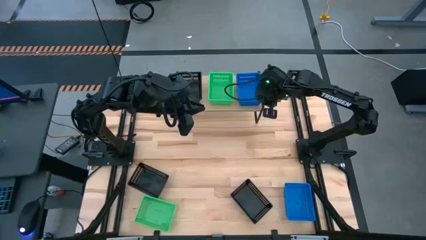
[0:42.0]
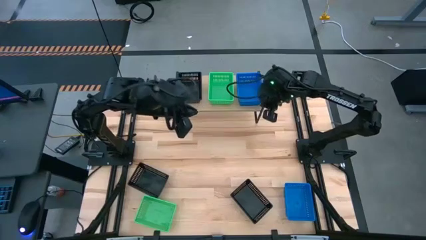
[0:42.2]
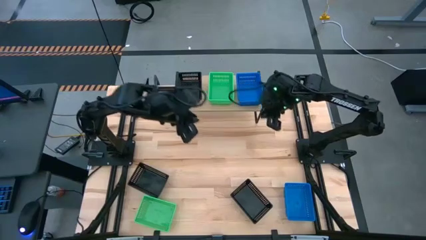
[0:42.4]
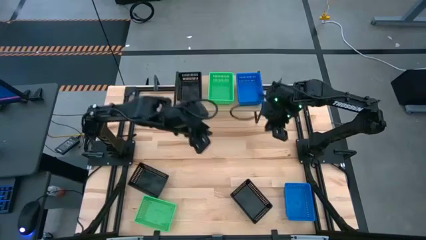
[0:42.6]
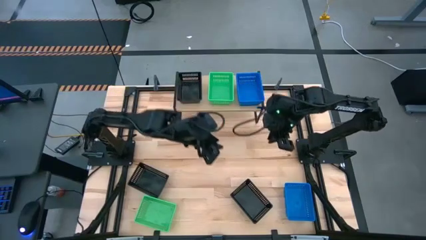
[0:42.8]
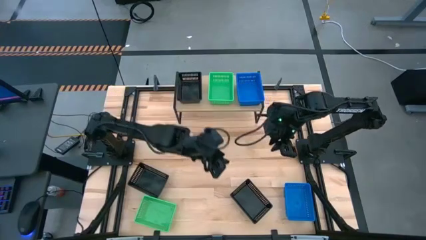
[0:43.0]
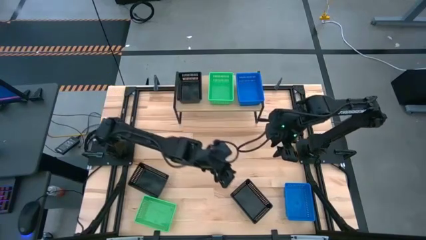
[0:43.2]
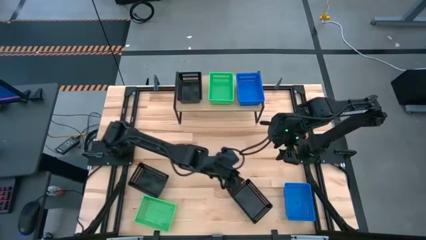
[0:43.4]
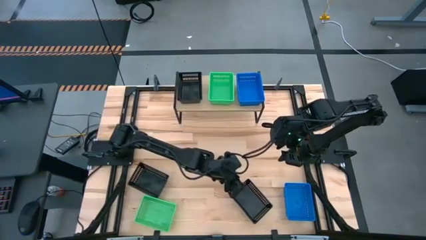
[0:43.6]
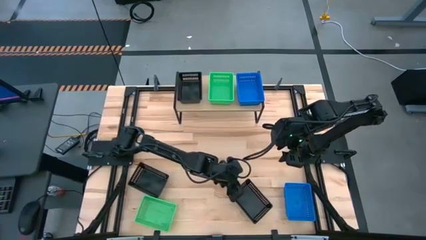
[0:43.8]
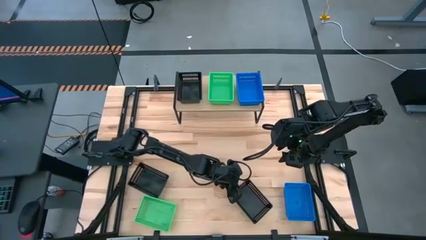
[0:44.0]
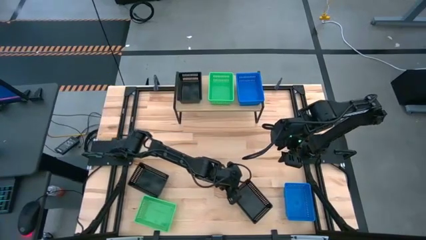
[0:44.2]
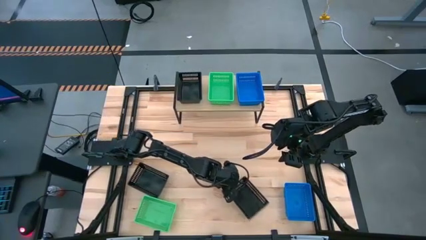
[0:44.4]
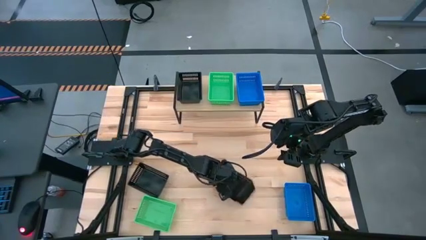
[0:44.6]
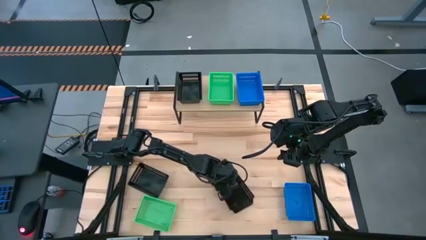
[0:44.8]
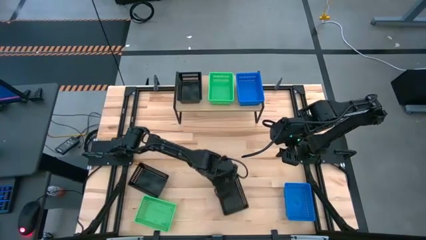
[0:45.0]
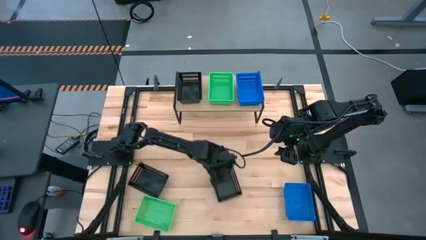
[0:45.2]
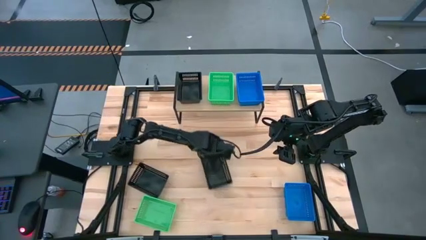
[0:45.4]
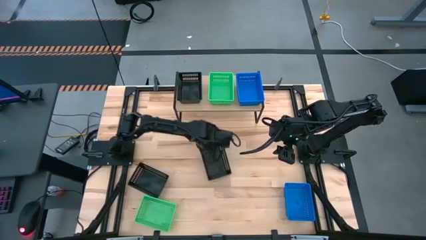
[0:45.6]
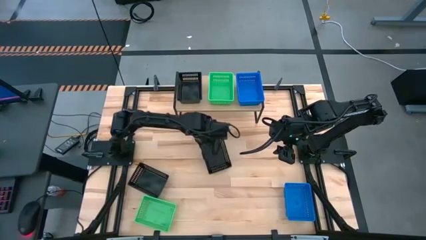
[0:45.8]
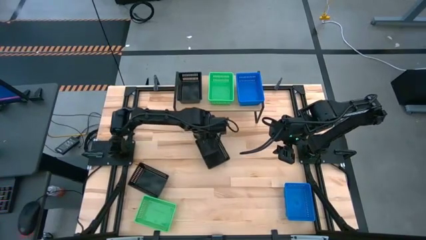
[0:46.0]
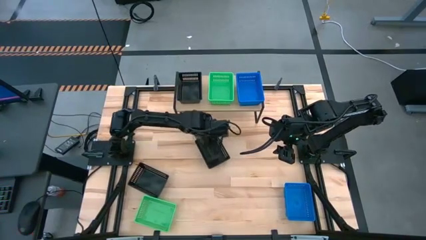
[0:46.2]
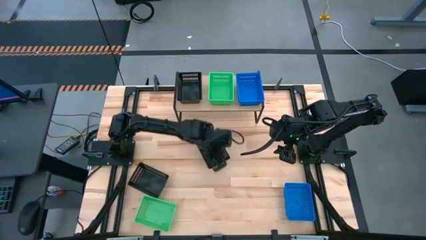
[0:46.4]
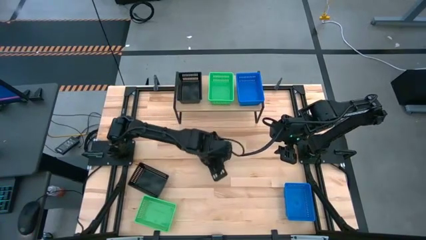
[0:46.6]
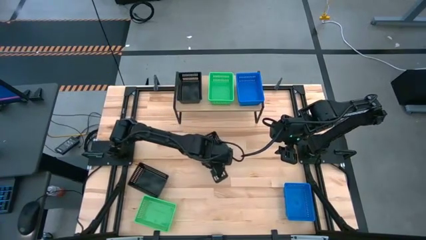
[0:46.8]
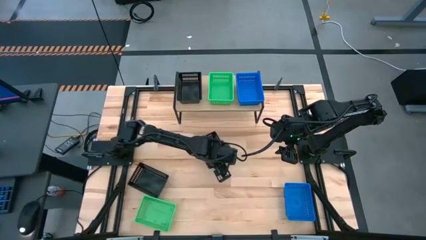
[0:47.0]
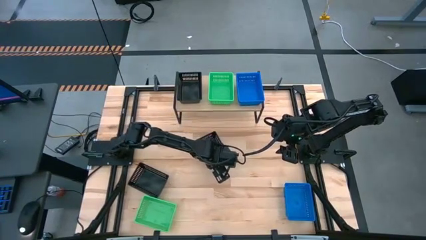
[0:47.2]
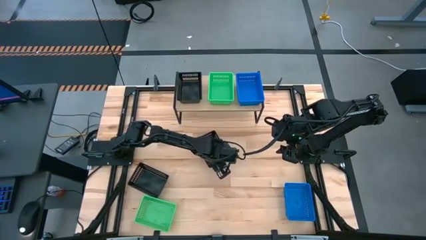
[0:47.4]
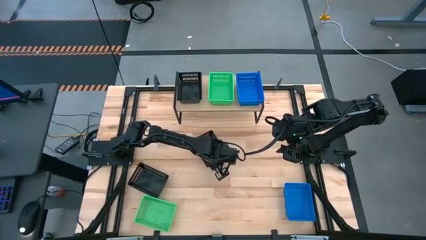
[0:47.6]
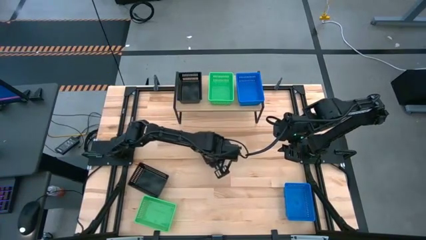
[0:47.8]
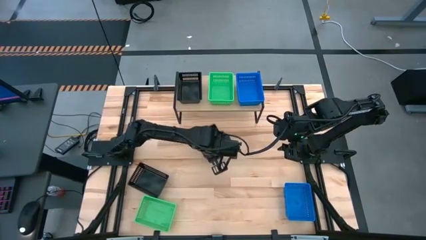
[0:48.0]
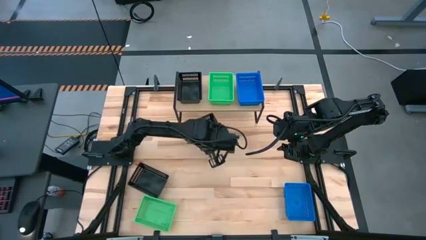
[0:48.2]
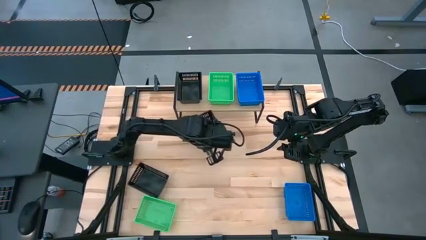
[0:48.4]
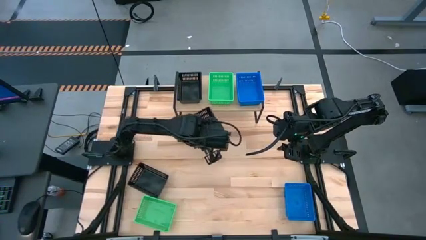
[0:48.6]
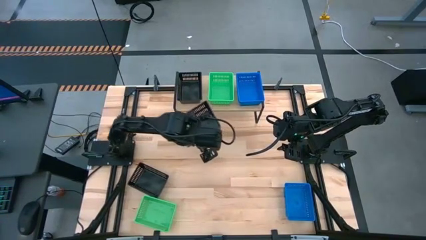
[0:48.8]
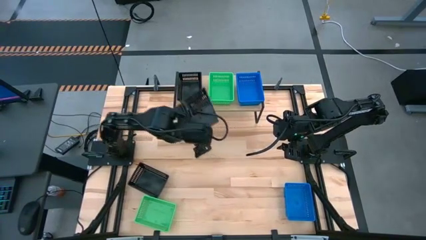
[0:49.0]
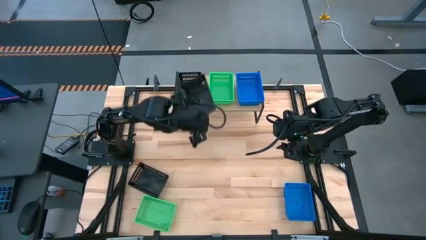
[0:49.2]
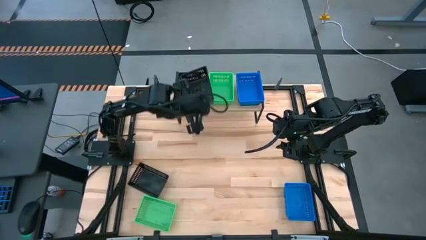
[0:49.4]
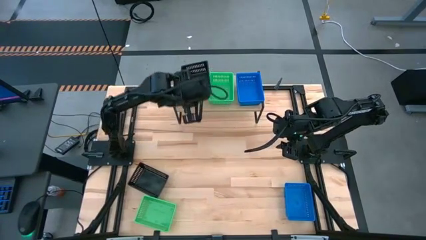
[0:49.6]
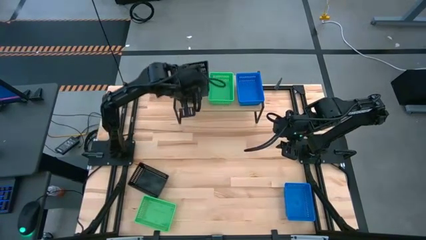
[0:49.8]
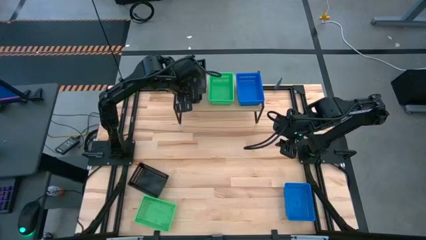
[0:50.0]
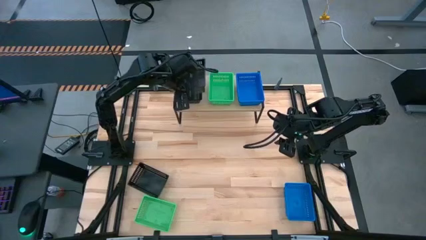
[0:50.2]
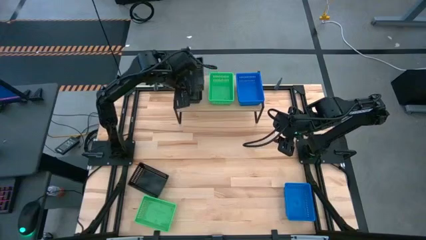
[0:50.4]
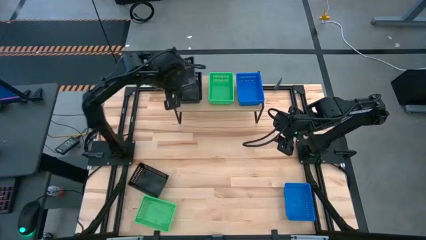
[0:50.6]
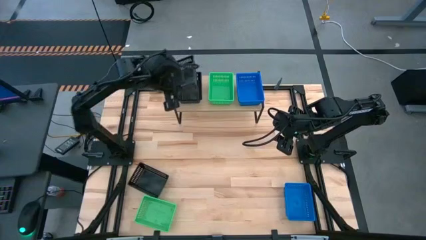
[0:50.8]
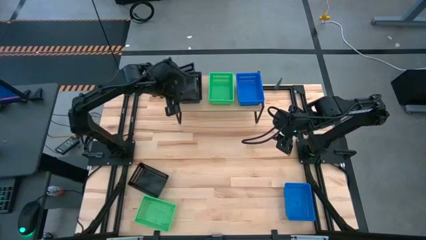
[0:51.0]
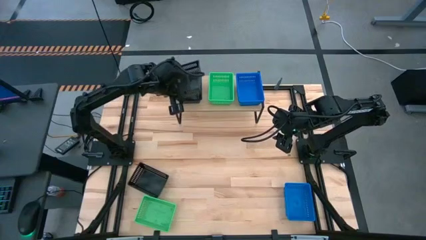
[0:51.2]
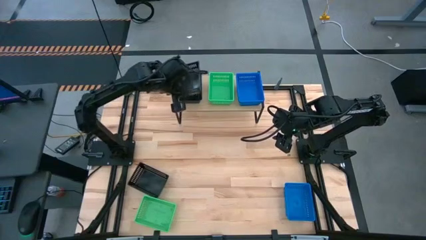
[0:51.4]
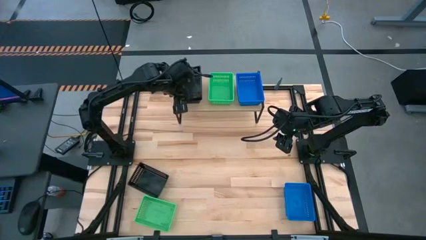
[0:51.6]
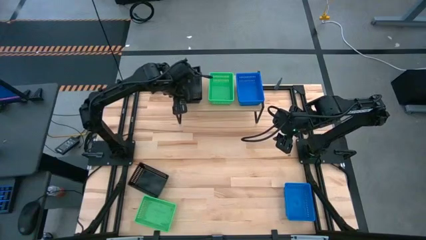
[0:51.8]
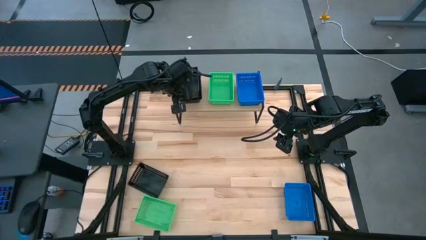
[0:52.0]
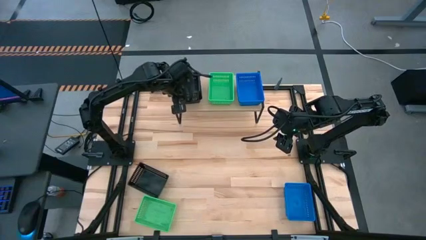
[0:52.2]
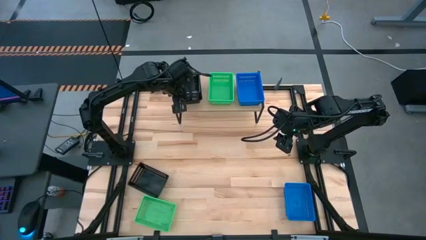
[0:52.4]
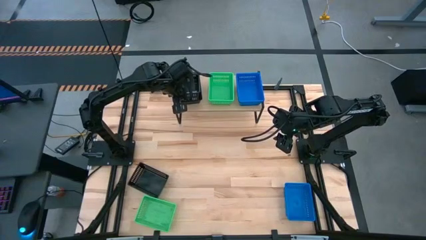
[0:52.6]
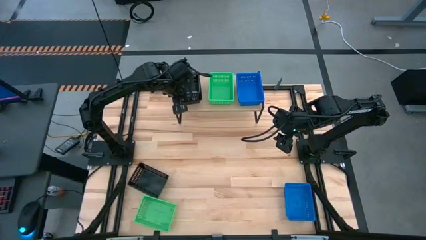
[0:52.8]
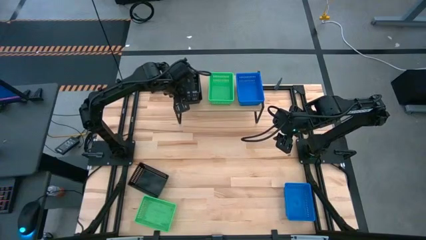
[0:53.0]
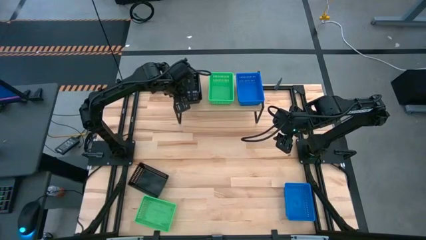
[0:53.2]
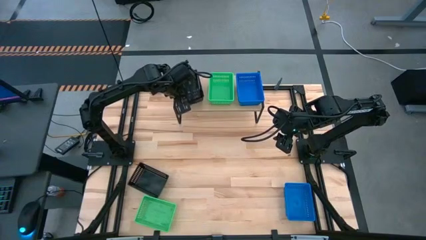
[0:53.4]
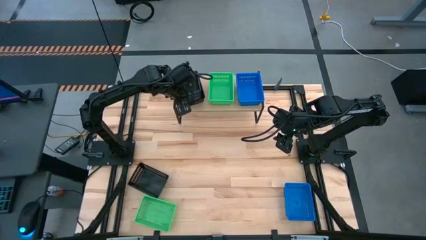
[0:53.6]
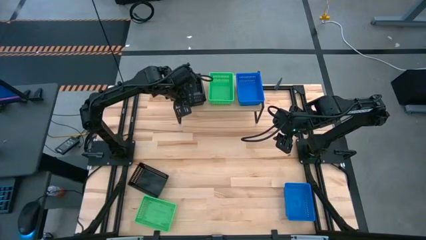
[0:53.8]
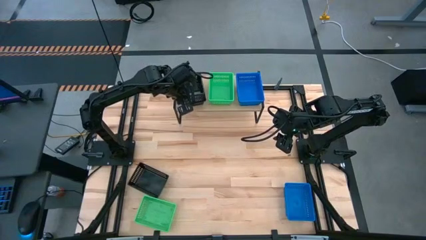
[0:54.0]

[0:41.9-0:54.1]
Task: Stack baskets on shelf by color
Stack the right black basket on top of the other black basket on the shelf

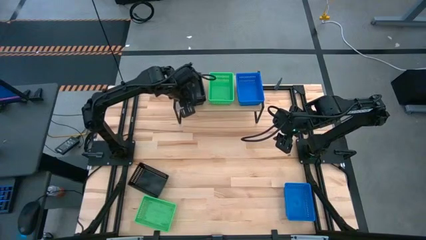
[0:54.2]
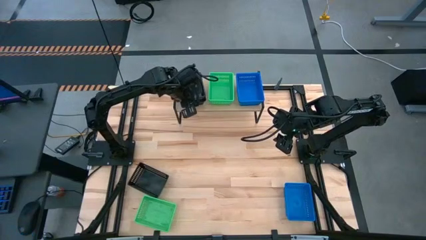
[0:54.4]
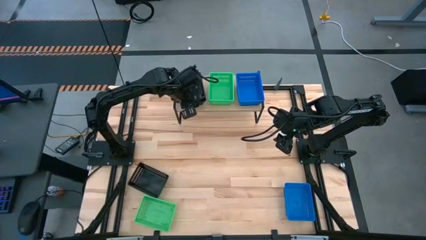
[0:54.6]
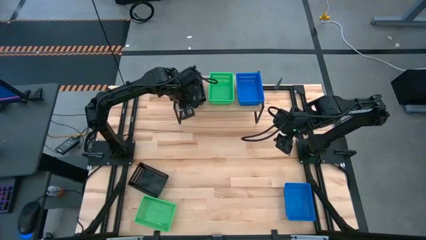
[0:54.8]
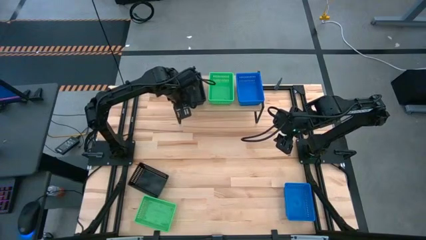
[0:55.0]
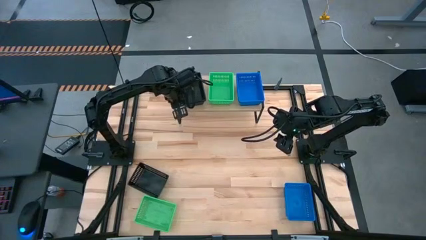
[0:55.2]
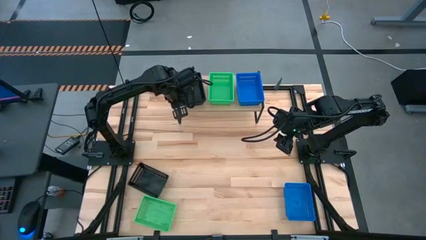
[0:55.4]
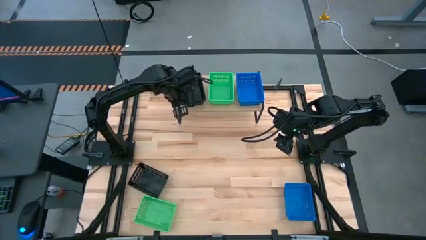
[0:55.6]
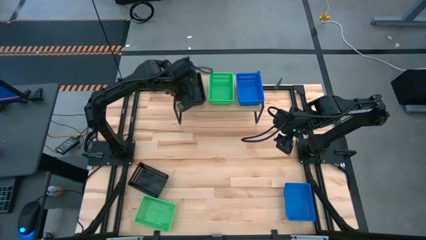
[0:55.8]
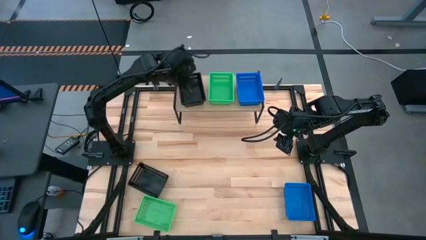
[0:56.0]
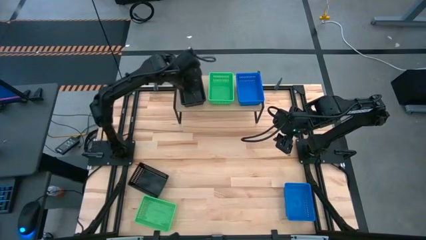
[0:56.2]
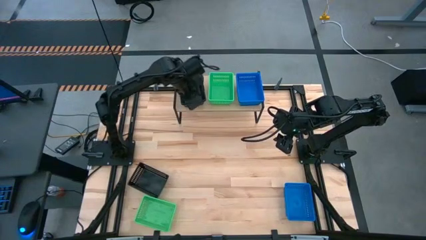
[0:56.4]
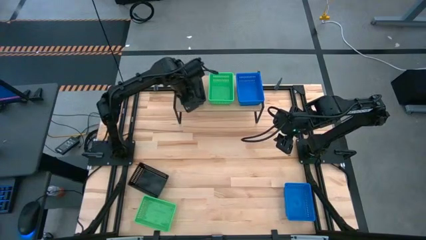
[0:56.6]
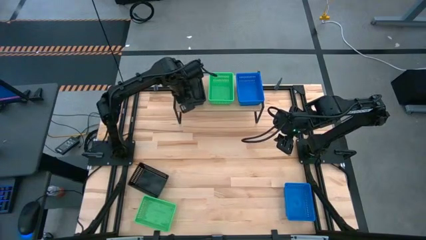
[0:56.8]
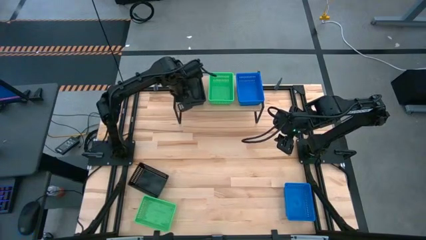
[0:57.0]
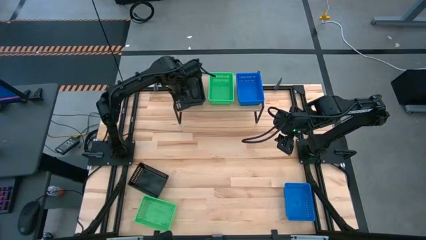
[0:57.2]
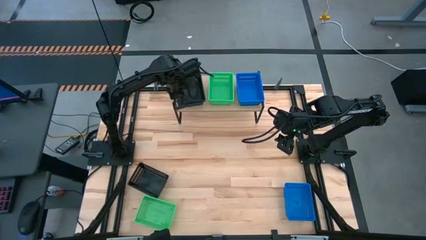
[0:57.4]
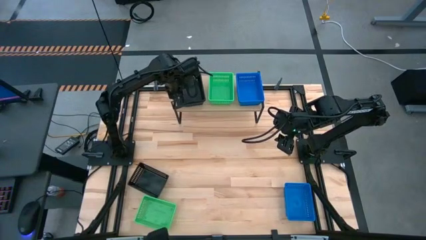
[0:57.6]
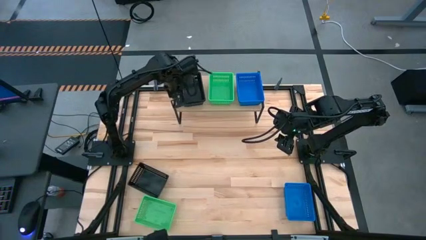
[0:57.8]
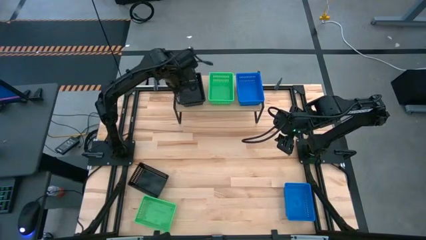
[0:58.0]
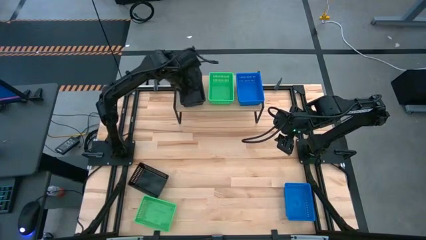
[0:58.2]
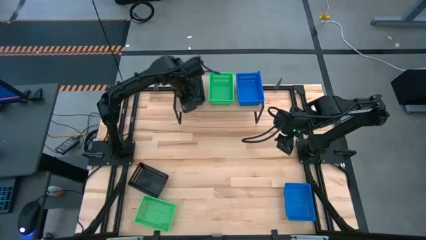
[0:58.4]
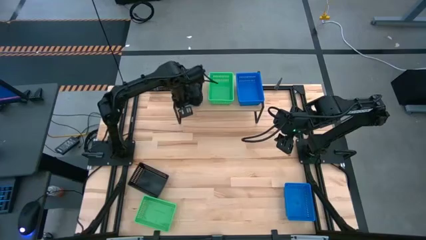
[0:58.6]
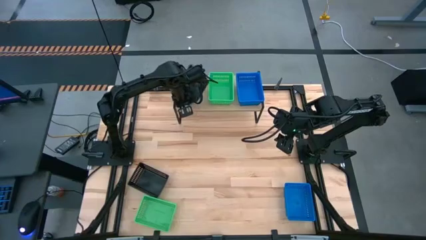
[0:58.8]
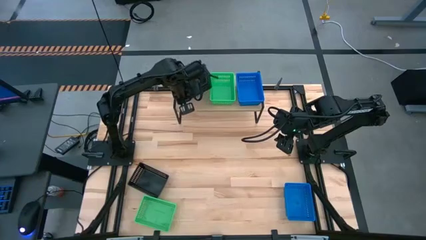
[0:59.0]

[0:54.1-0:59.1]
Adjust the black baskets
